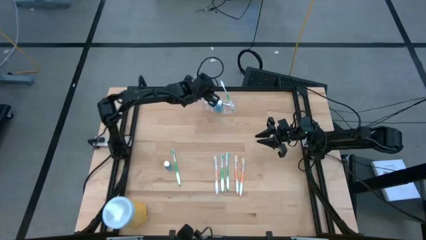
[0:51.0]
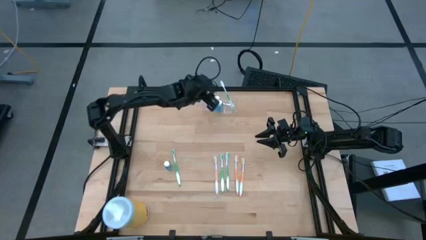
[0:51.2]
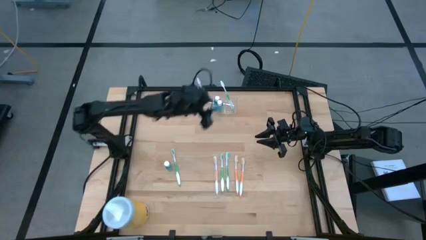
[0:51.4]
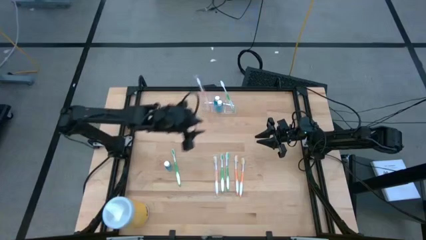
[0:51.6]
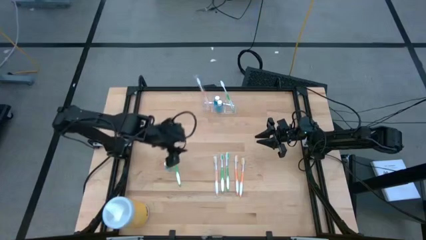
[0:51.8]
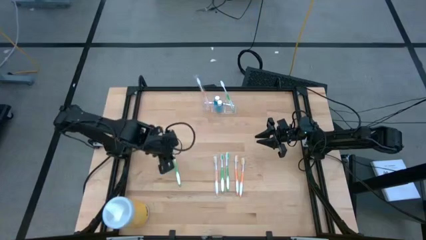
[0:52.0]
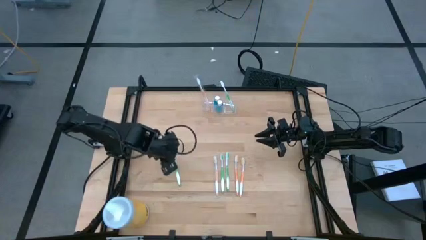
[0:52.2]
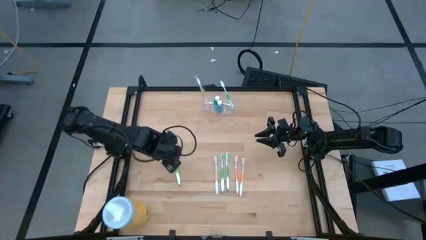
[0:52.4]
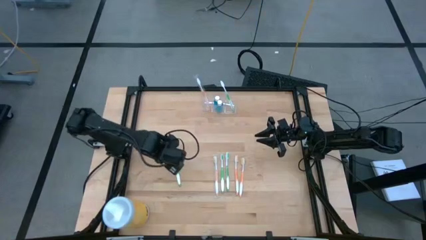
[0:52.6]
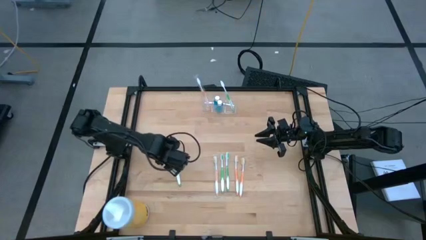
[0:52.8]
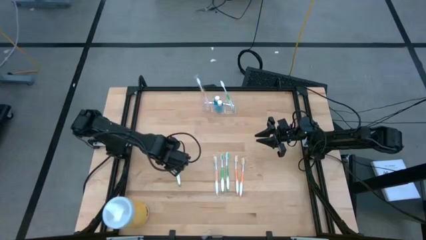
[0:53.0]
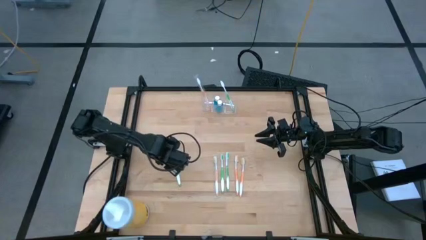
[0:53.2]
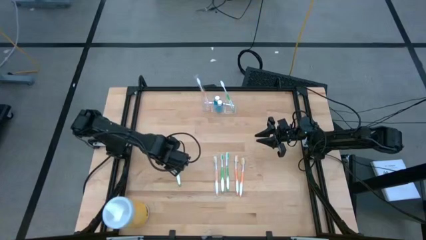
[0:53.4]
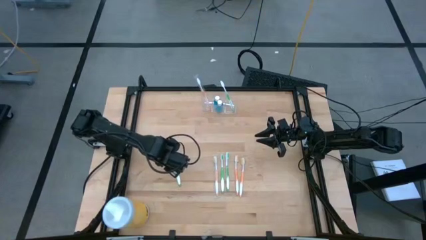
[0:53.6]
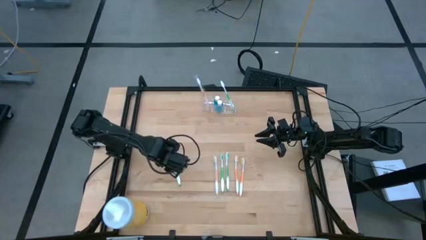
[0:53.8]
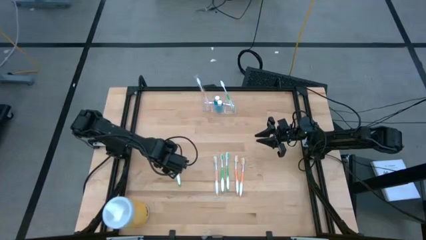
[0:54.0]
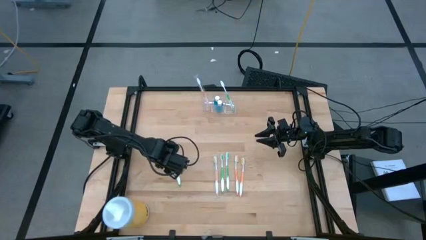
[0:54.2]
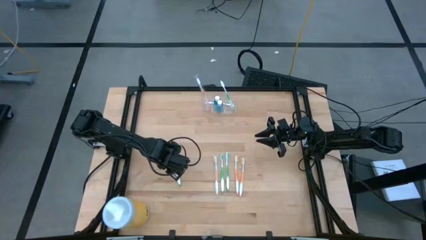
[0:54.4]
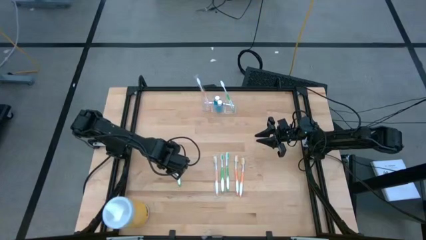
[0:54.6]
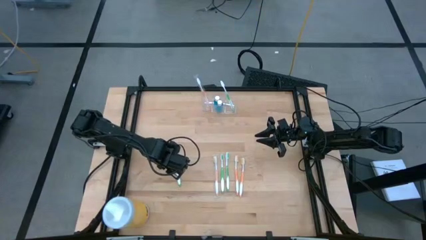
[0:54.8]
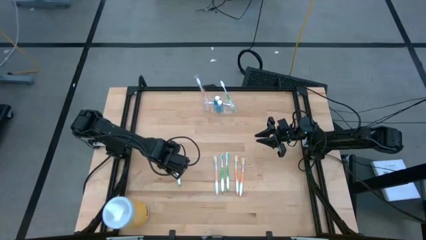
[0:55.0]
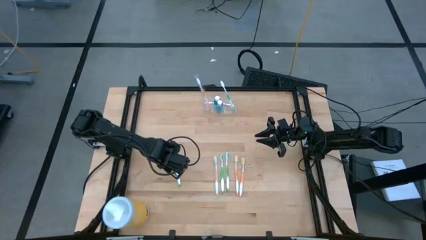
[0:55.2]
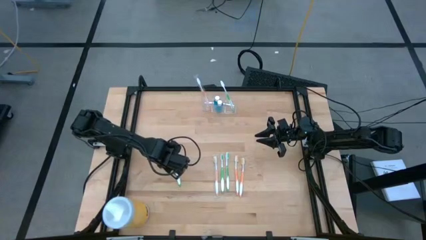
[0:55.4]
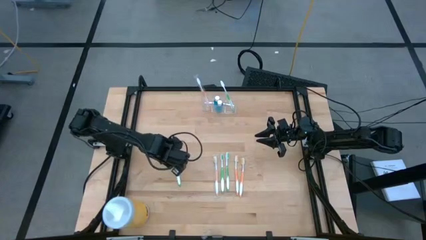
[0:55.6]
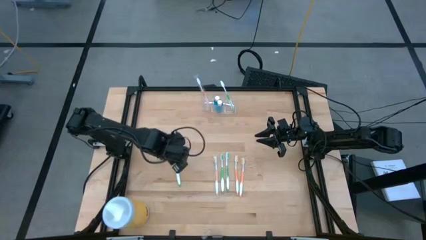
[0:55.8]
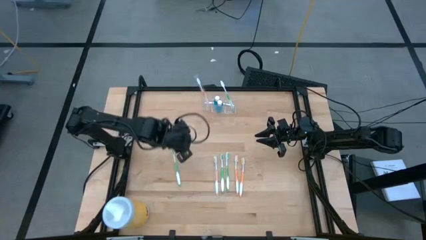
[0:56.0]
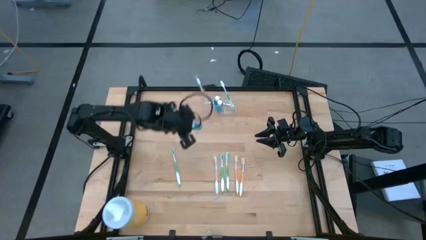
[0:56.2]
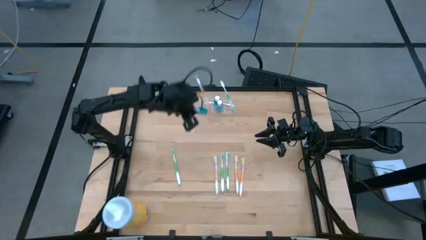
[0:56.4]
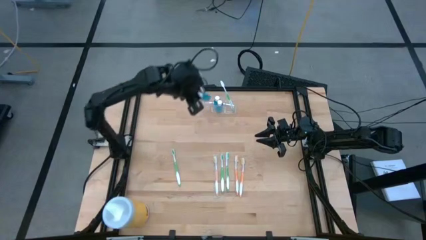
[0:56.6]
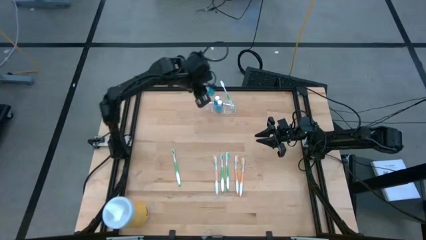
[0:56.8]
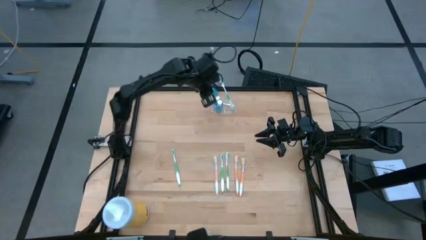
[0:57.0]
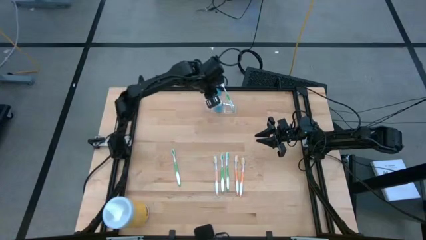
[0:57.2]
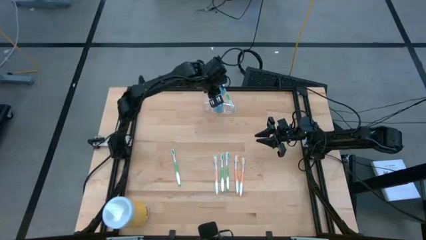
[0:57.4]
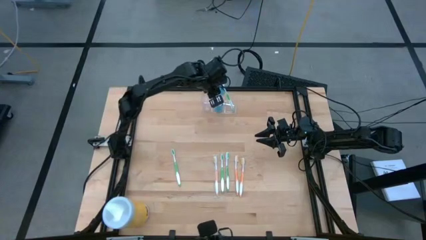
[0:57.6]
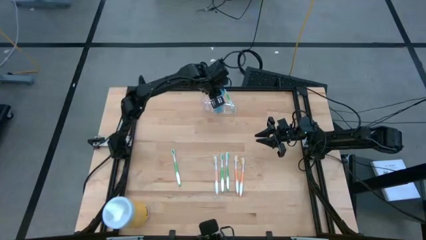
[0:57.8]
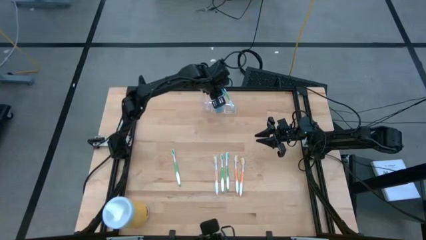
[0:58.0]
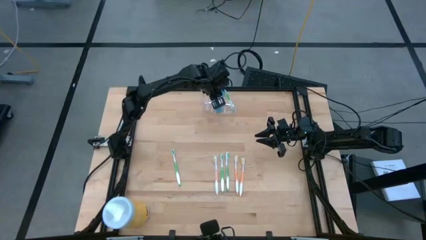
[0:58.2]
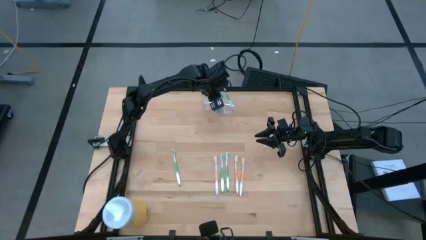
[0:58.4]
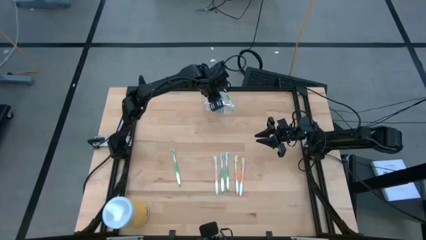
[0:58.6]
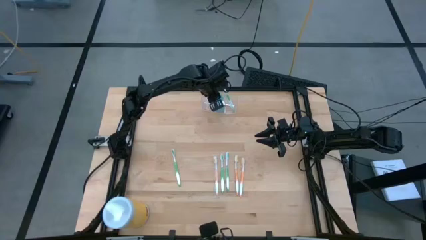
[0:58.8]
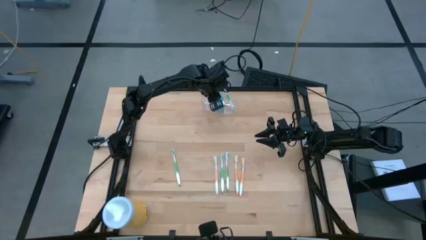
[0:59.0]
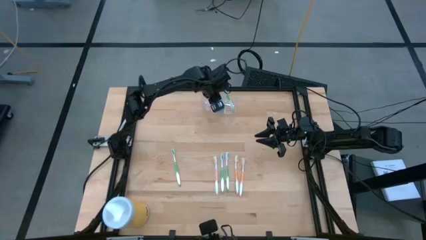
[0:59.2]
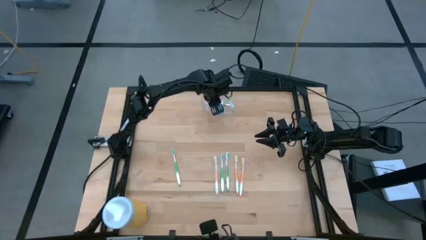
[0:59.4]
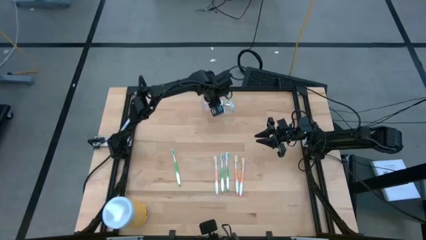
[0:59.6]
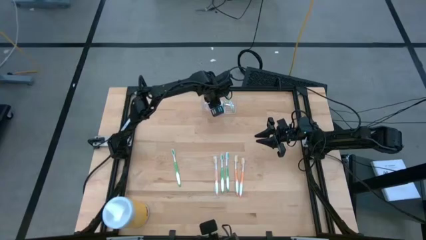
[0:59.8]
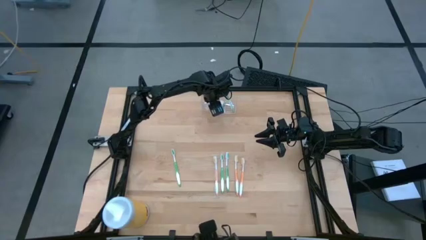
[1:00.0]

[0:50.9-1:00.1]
Task: Pick & Place toothbrushing station
Put the blue mouthwash into the transparent organizer

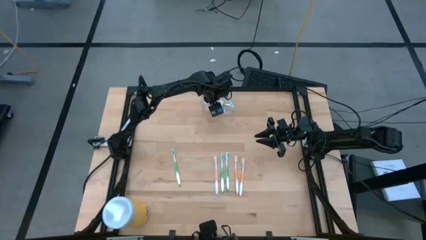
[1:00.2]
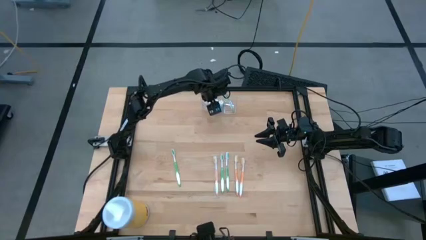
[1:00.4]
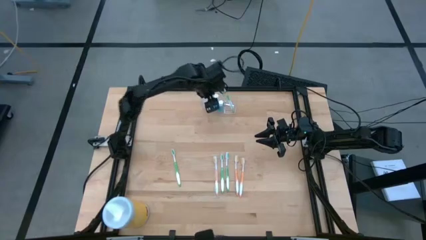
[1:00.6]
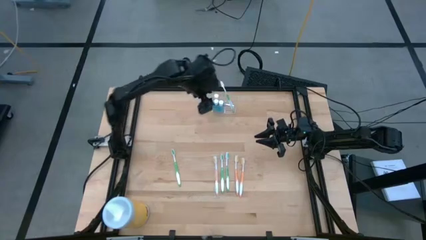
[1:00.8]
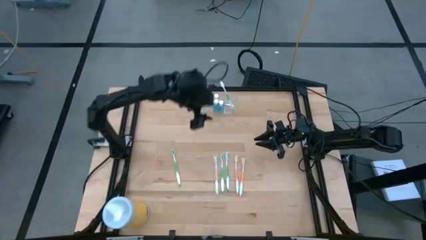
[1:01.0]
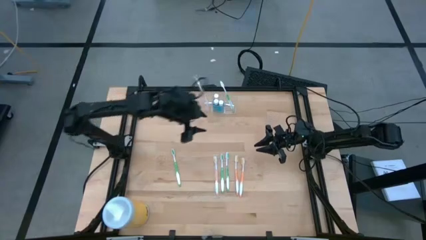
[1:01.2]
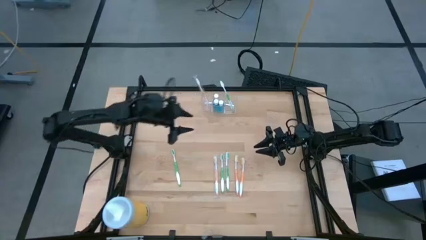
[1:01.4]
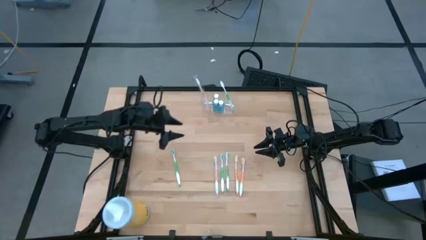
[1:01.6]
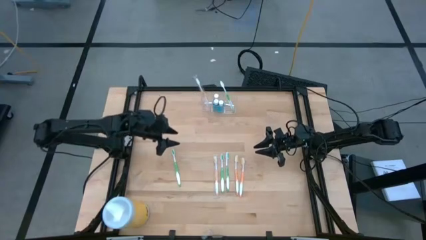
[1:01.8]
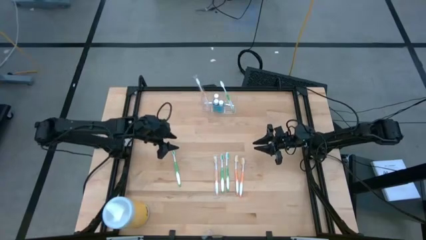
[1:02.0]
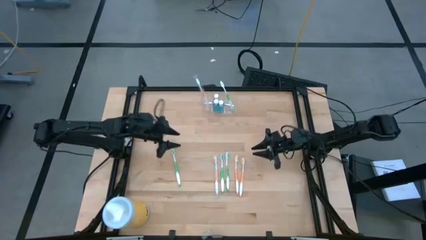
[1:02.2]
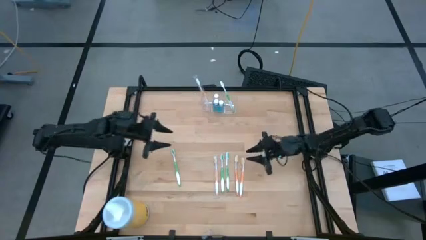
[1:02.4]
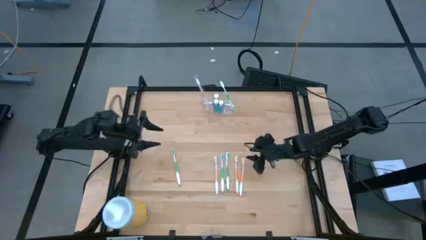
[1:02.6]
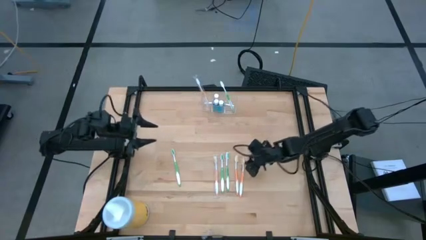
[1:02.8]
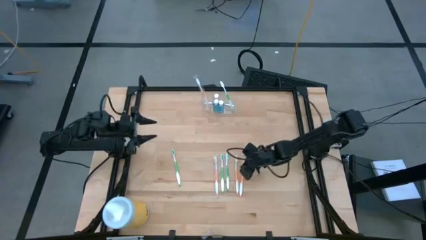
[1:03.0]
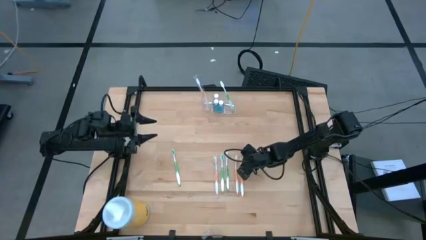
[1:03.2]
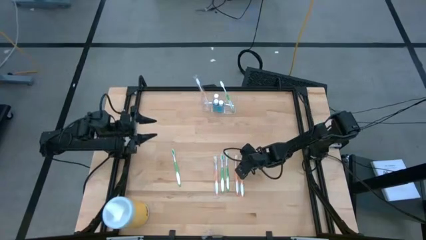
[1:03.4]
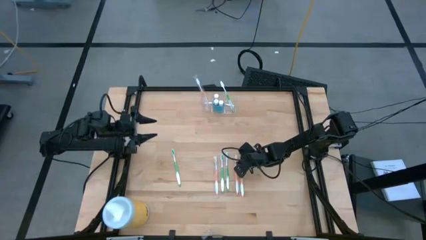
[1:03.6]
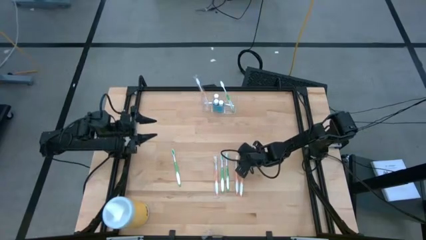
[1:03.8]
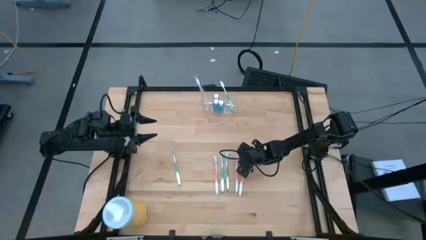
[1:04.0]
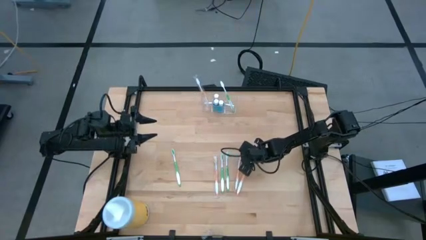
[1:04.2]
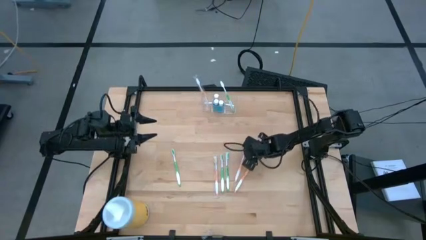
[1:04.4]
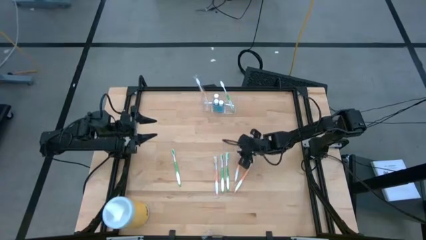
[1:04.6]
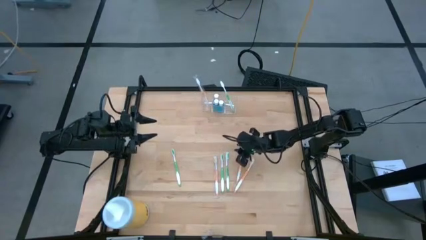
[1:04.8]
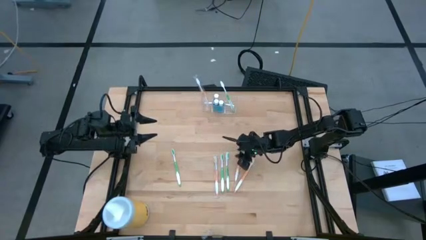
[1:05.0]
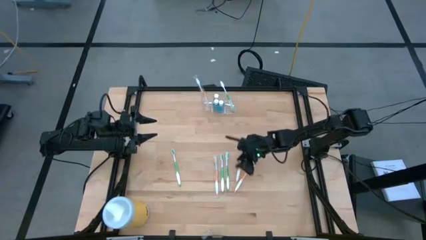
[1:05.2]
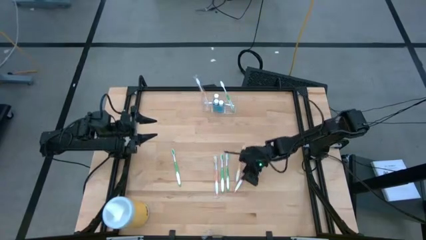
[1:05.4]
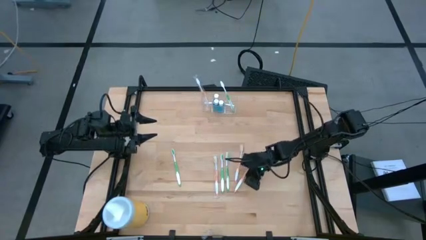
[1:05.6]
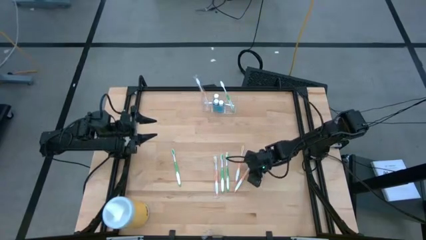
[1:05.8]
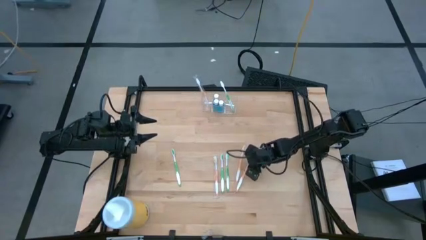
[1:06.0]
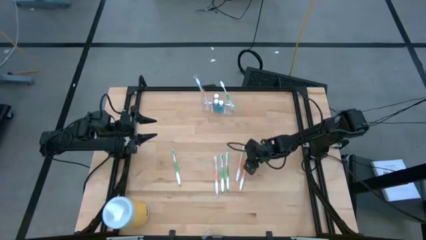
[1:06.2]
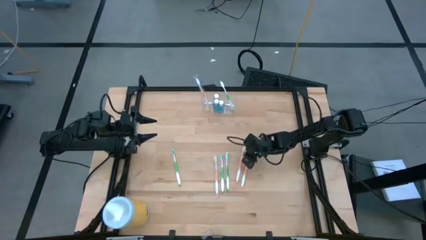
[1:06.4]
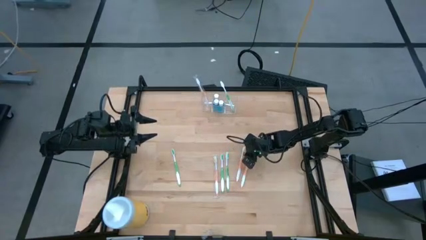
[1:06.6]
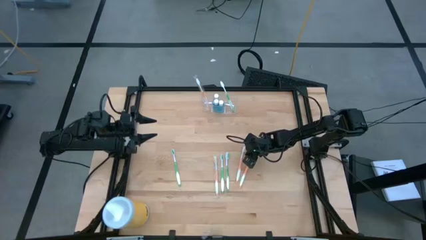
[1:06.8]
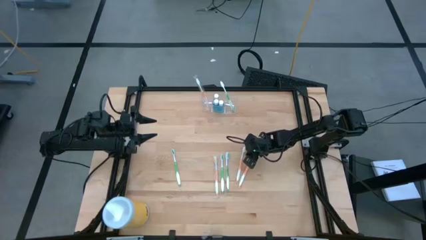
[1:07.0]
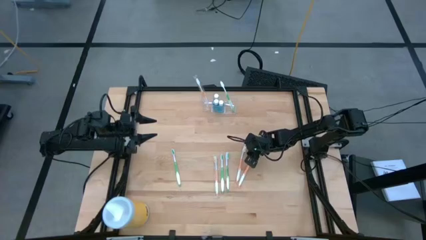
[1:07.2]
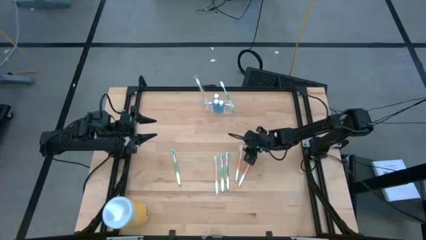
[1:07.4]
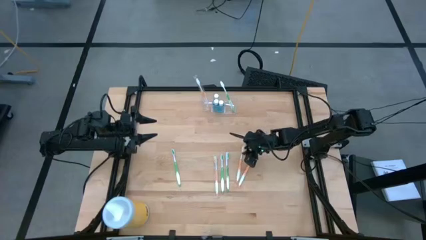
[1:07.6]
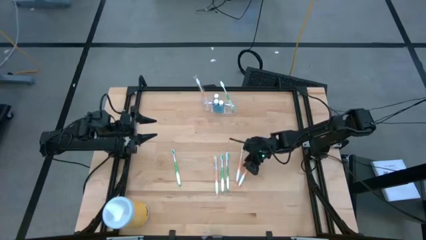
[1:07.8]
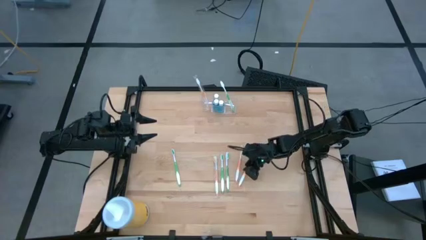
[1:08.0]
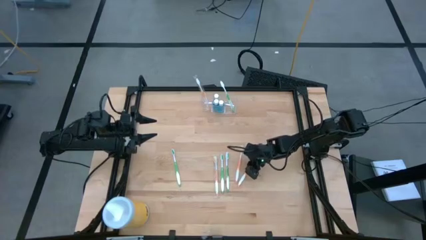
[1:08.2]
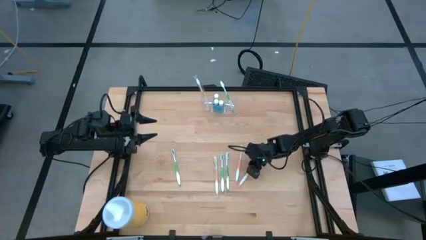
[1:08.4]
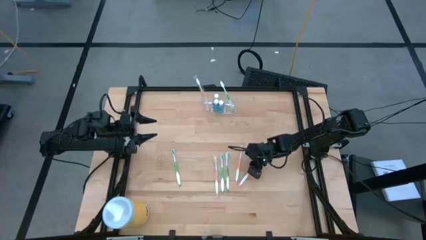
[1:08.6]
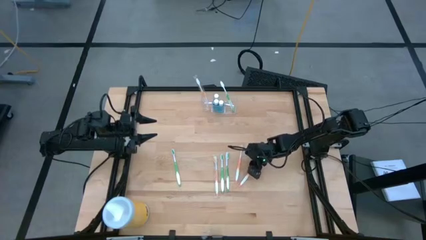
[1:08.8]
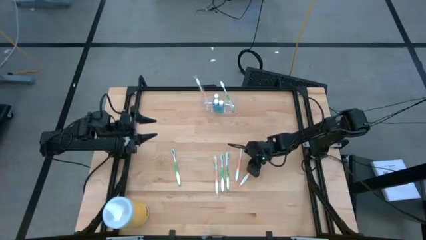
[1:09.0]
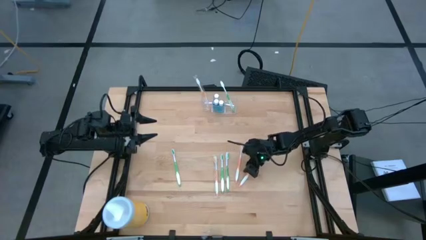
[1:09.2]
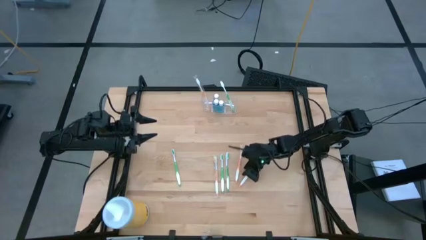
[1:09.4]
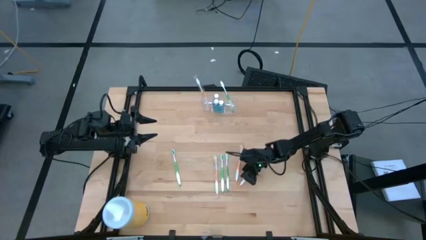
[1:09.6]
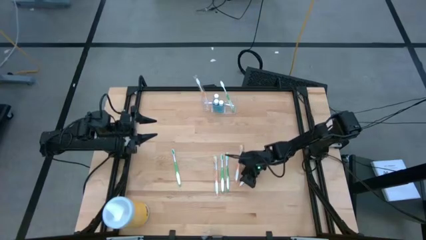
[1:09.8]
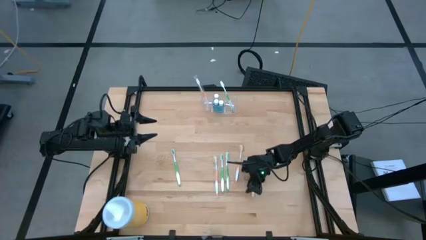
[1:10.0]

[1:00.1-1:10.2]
Put the orange toothbrush into the transparent organizer
